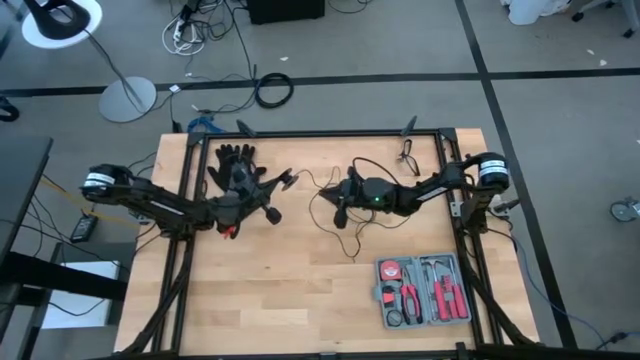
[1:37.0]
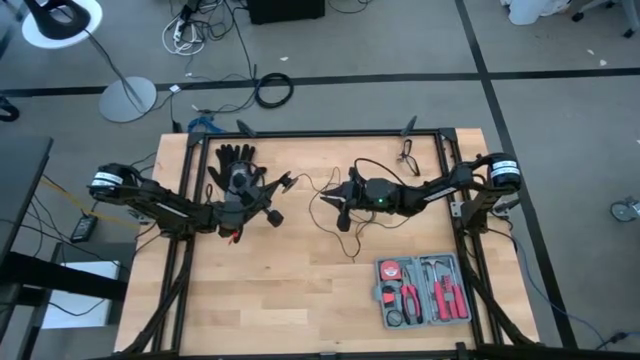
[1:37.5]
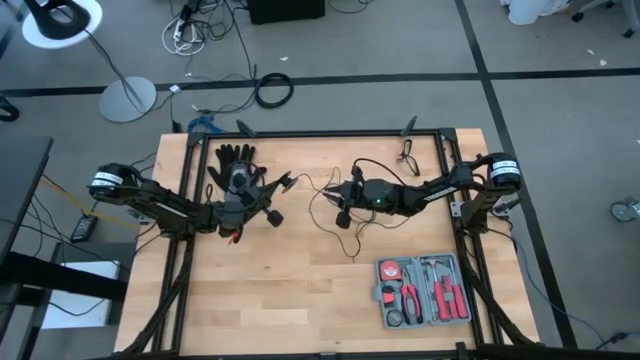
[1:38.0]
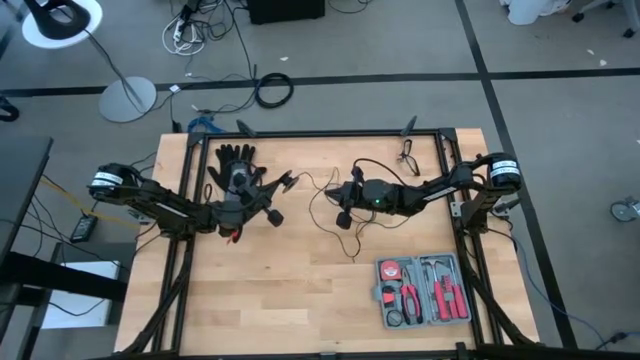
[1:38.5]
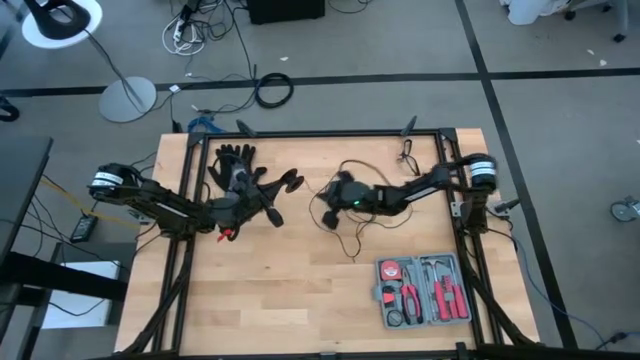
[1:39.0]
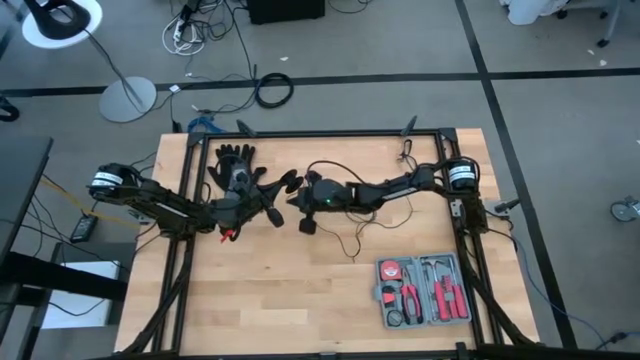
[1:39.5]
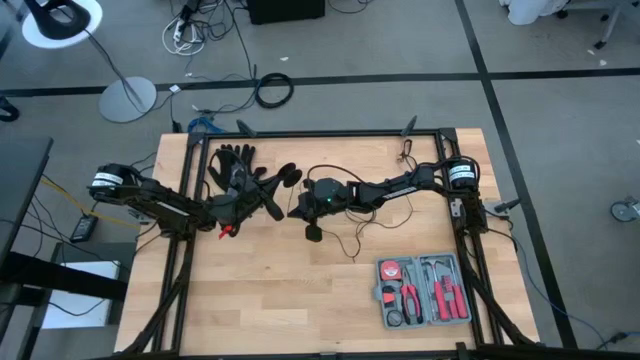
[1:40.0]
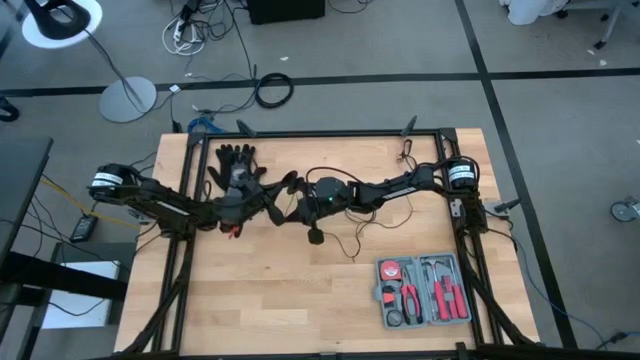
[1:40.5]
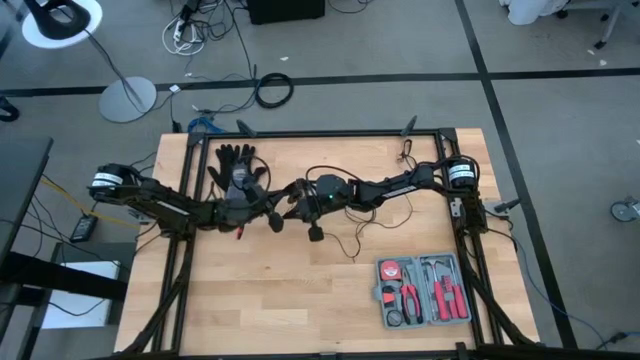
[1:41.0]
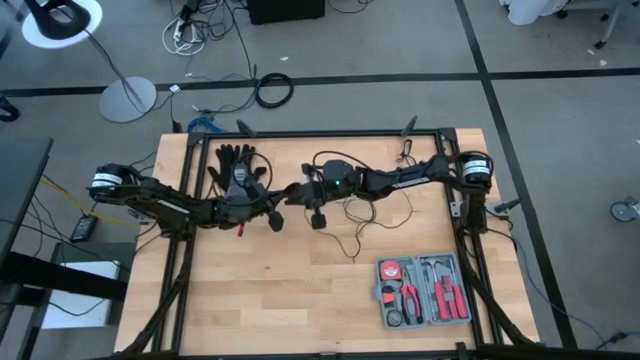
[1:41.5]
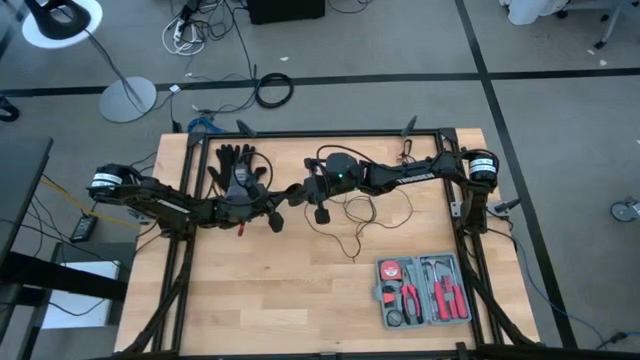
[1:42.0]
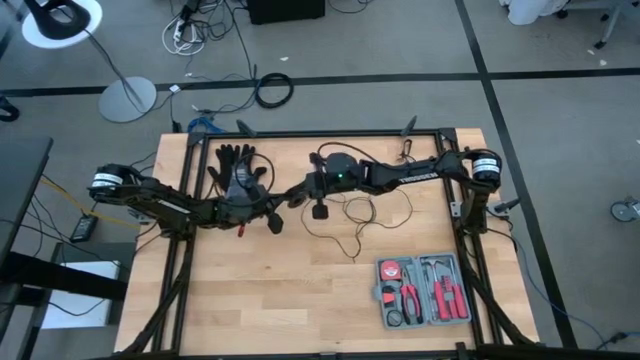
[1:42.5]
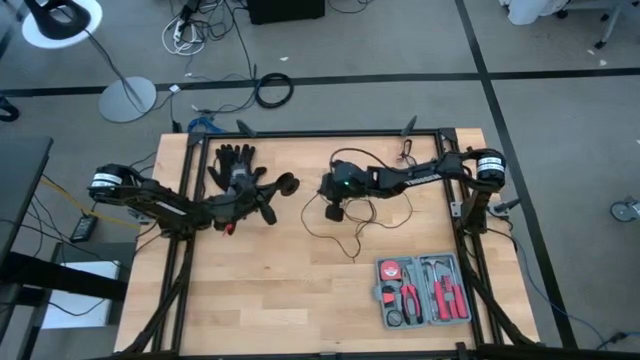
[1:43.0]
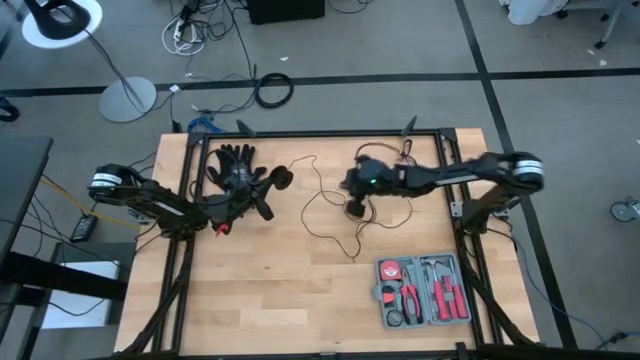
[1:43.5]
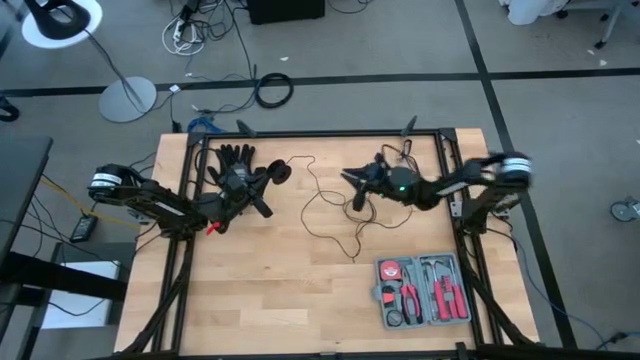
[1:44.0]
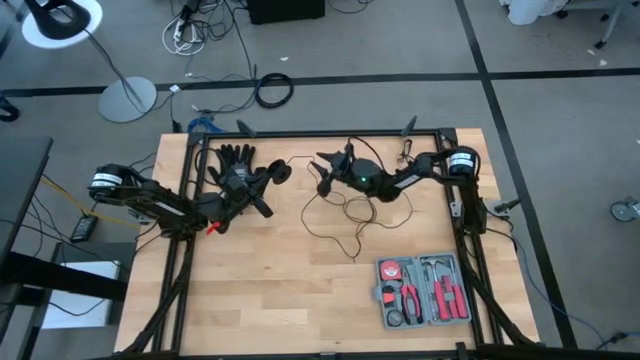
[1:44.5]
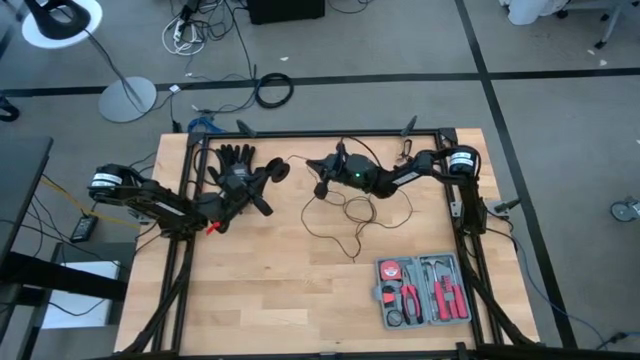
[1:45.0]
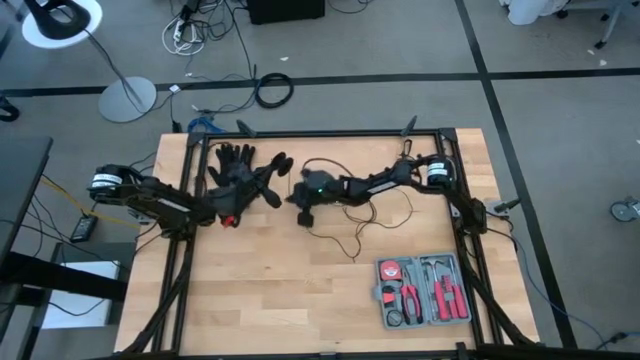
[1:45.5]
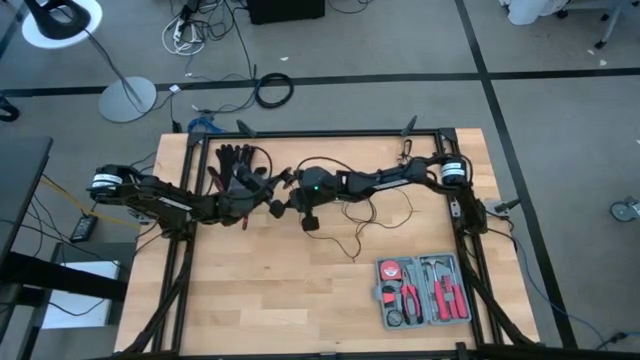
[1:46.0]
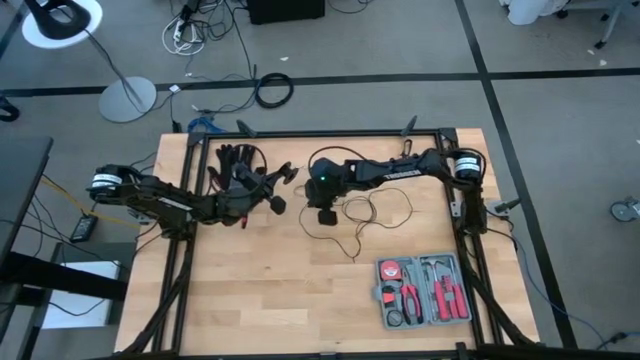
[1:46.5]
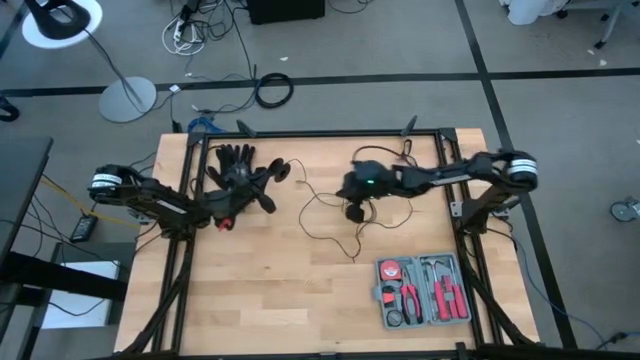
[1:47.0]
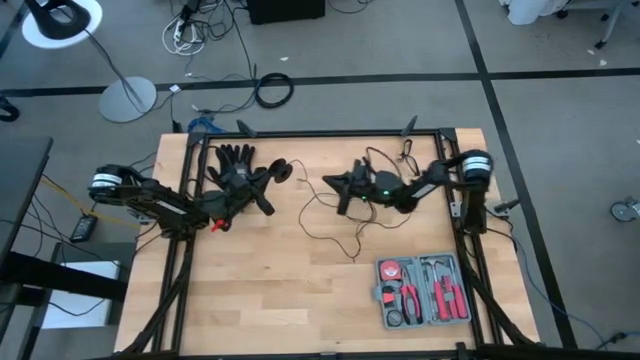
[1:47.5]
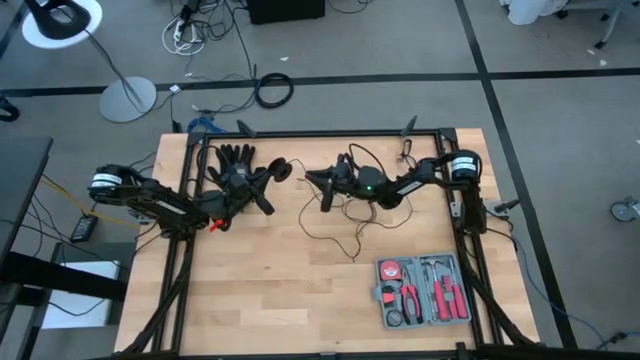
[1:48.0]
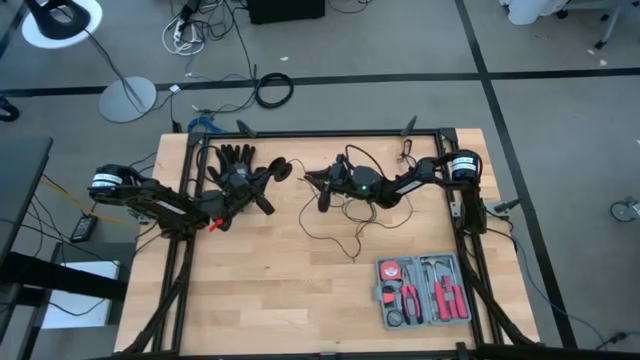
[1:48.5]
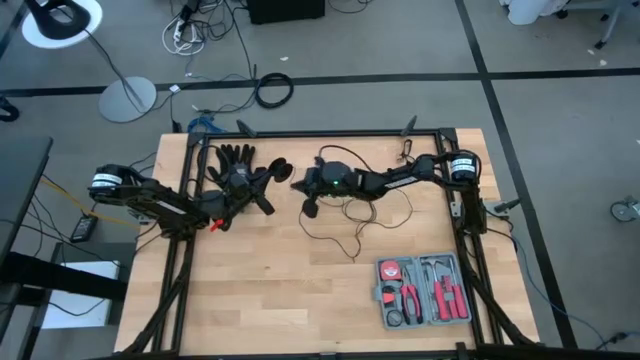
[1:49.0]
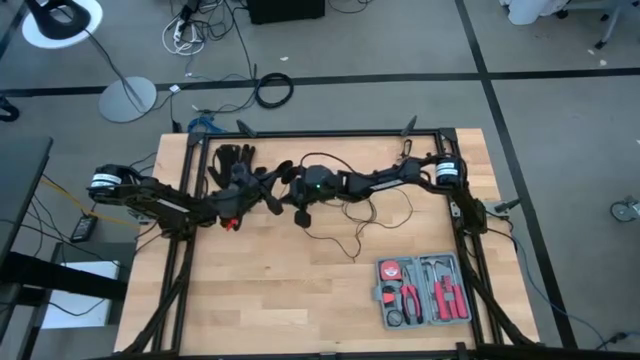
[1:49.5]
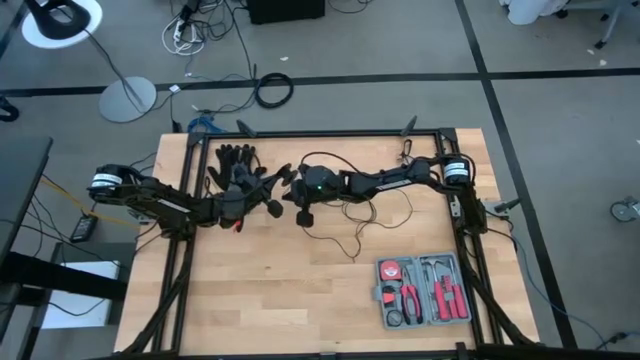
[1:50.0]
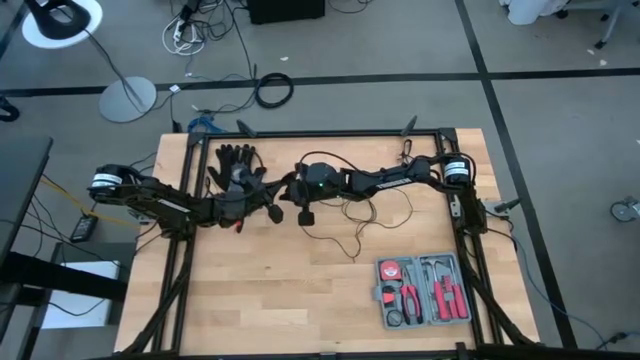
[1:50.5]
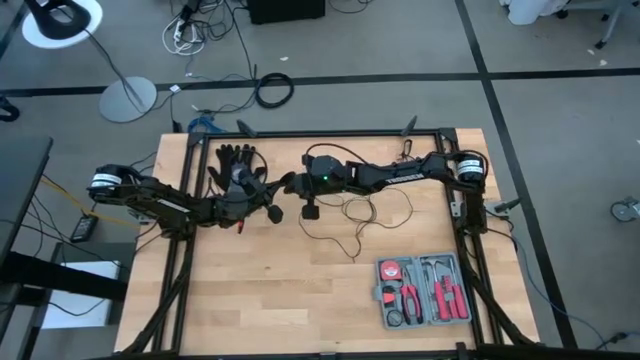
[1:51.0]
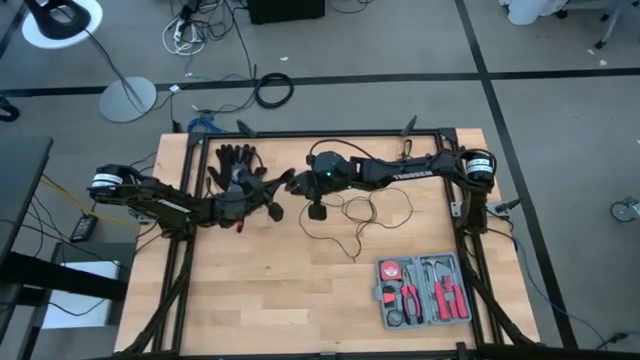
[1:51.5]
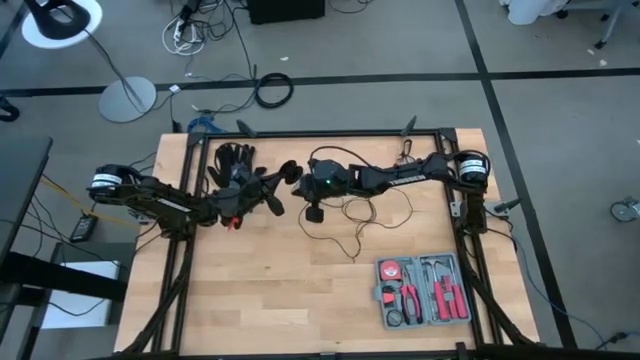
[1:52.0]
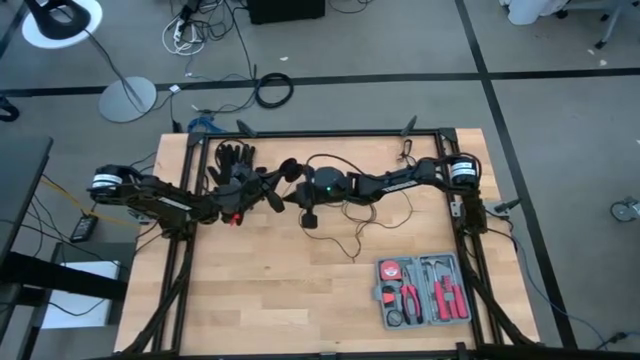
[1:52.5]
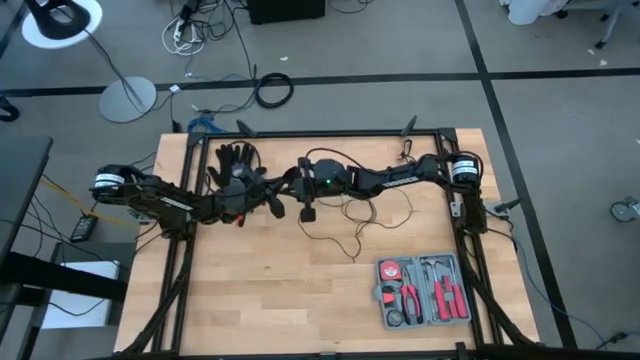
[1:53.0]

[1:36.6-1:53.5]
Task: Coil cords
Coil the black wire

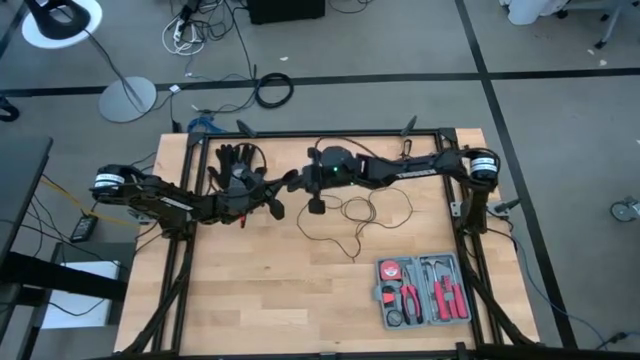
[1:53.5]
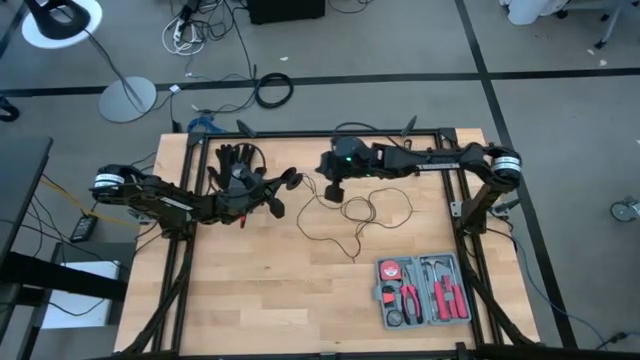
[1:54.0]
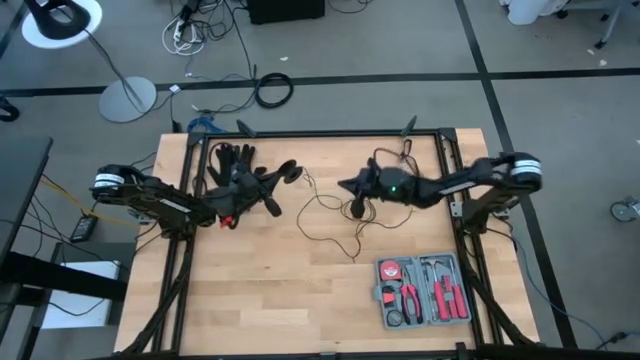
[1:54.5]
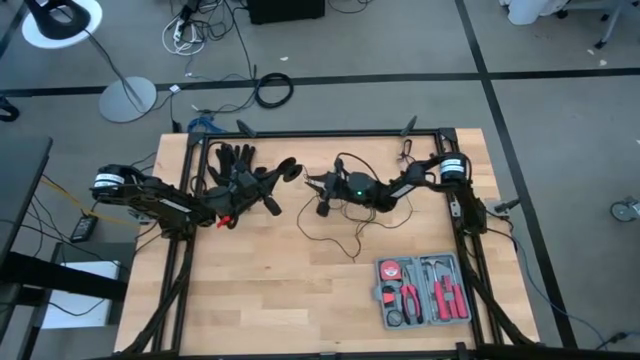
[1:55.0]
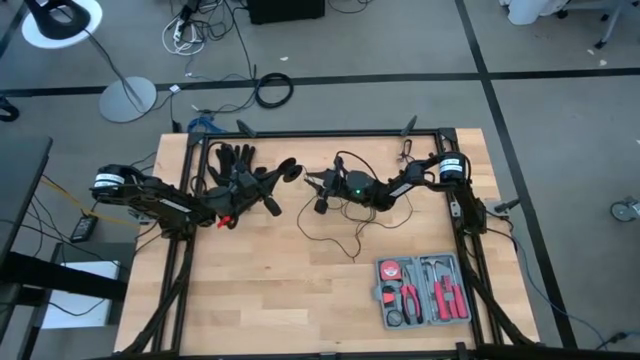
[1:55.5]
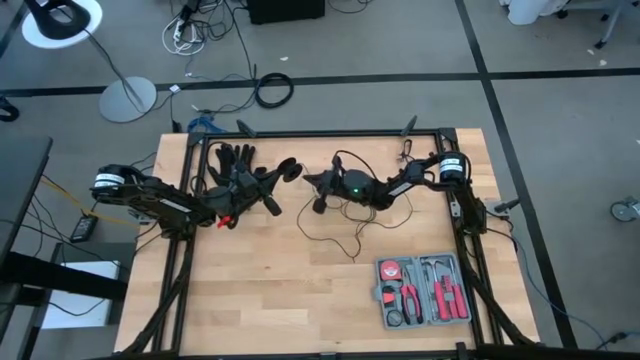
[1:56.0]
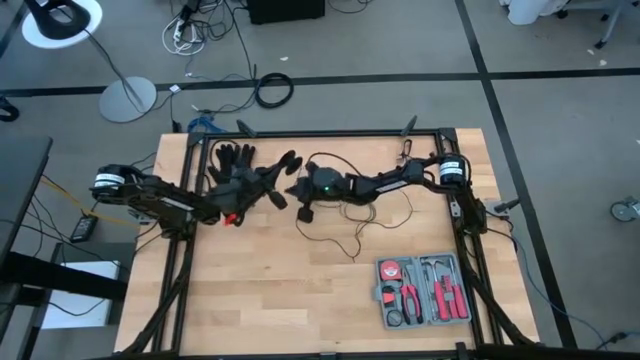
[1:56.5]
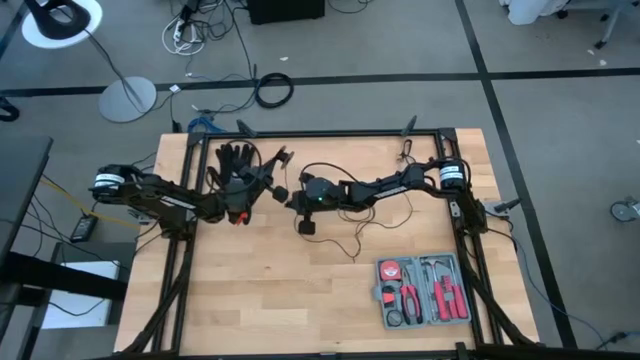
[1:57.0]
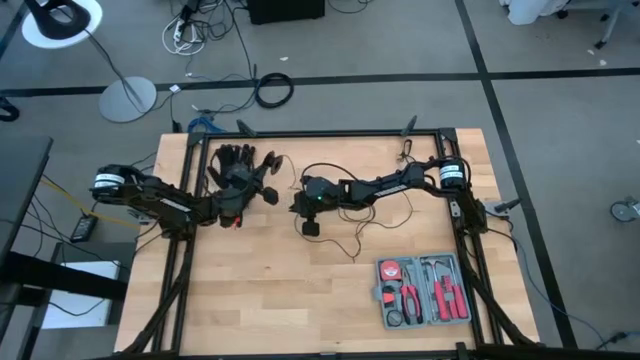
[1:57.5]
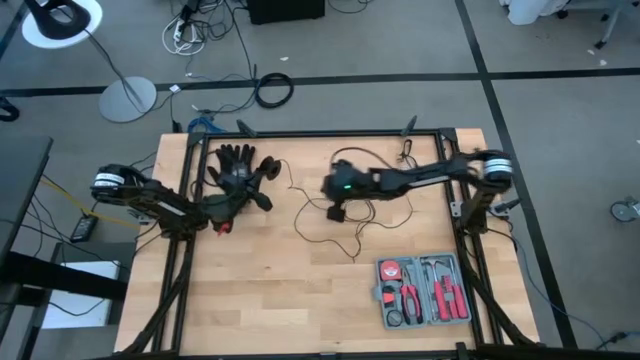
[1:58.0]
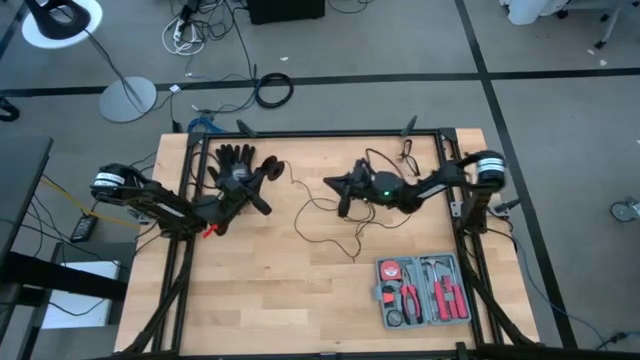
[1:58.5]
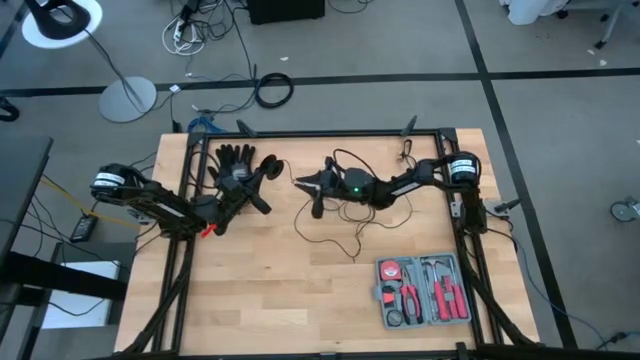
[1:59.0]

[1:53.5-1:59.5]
Coil the black wire
